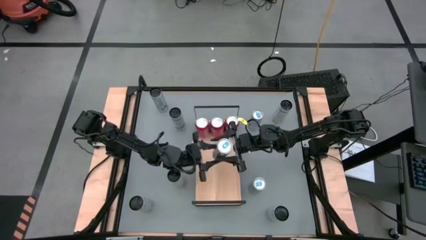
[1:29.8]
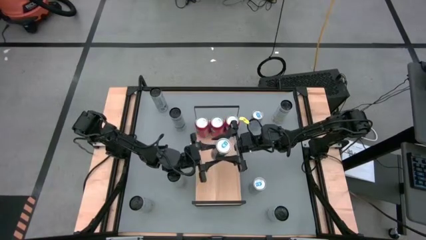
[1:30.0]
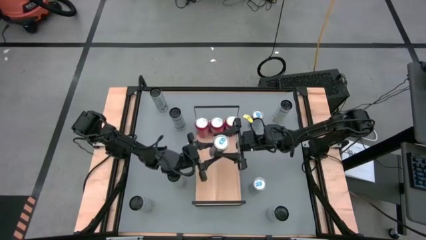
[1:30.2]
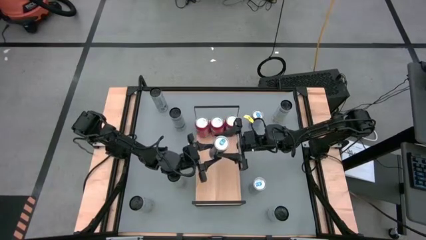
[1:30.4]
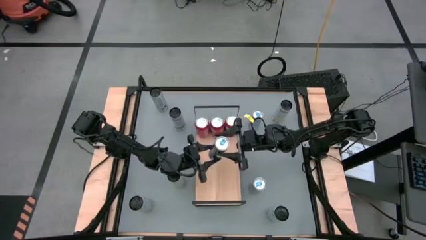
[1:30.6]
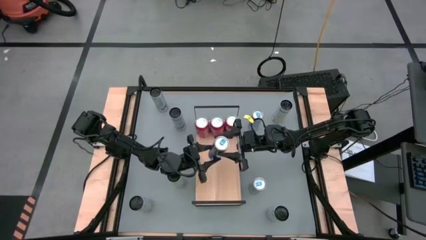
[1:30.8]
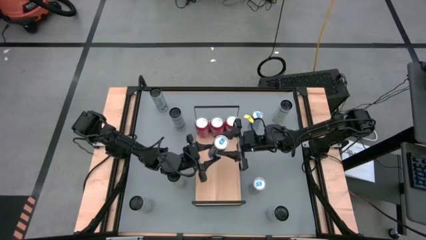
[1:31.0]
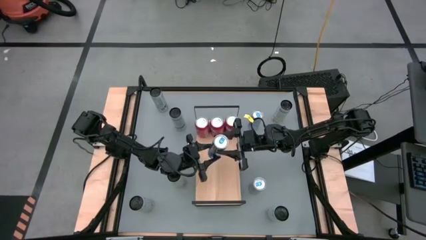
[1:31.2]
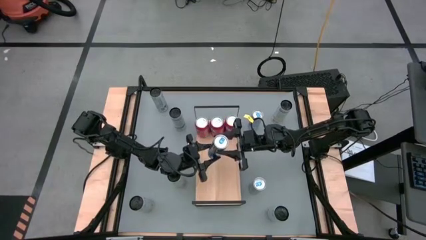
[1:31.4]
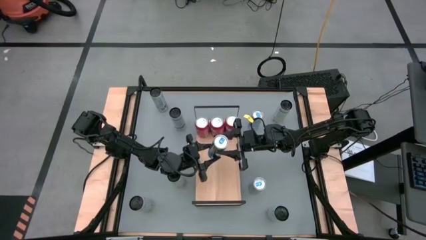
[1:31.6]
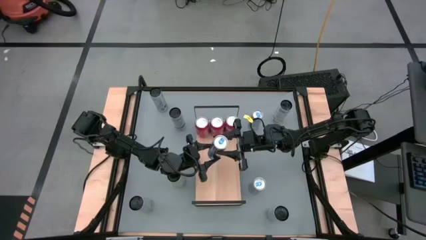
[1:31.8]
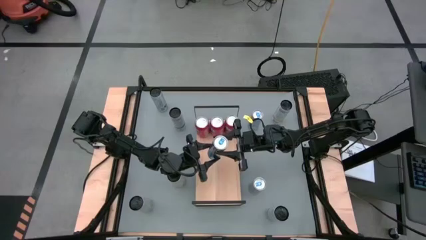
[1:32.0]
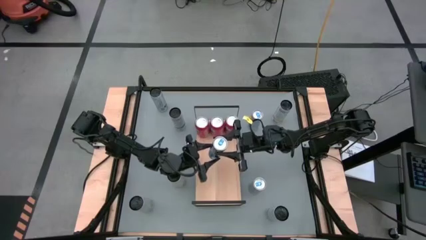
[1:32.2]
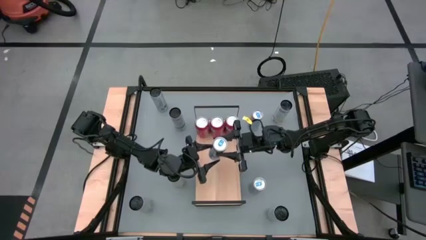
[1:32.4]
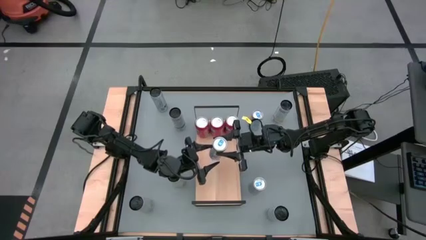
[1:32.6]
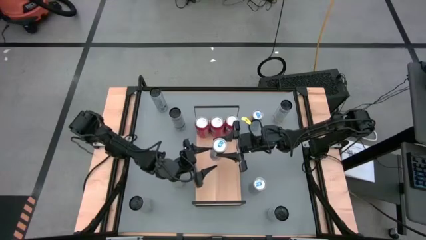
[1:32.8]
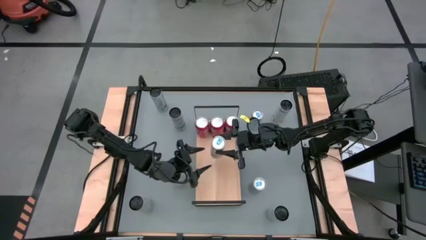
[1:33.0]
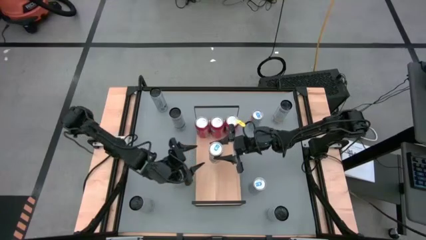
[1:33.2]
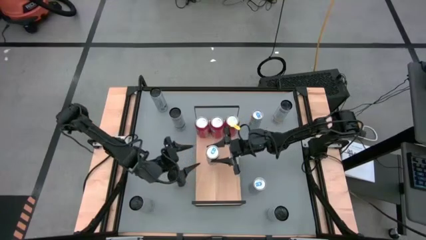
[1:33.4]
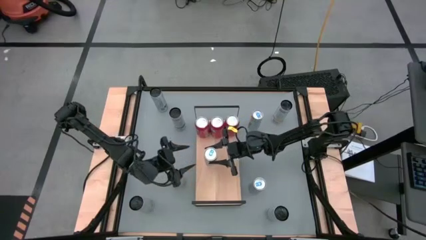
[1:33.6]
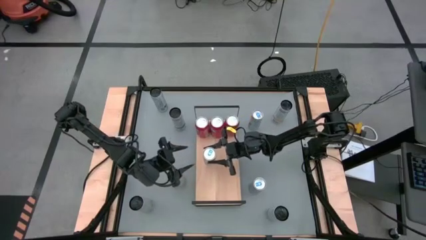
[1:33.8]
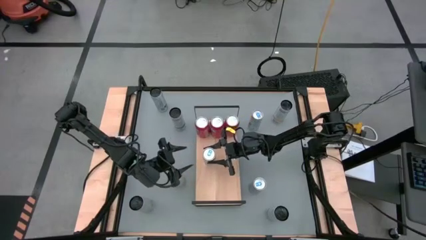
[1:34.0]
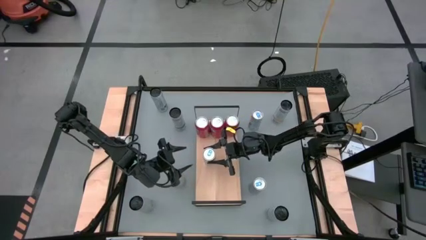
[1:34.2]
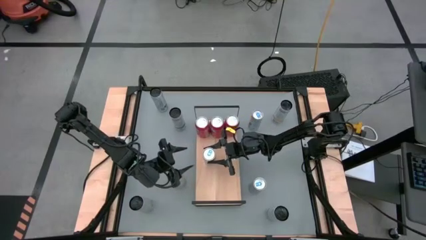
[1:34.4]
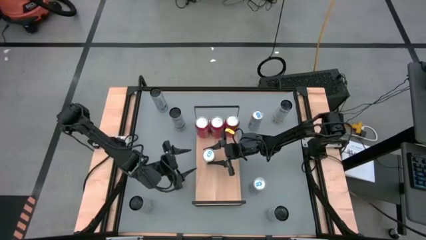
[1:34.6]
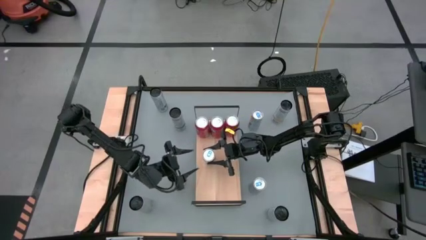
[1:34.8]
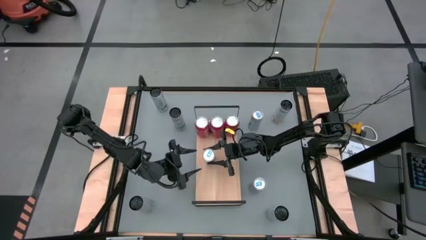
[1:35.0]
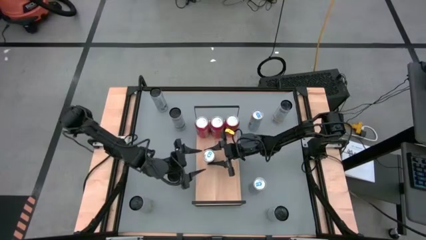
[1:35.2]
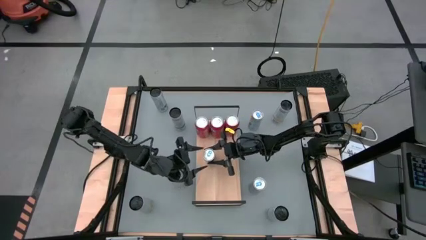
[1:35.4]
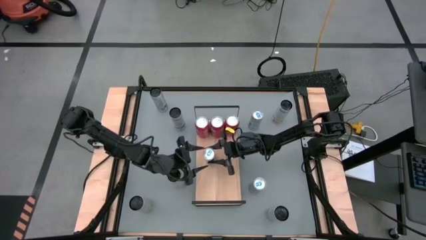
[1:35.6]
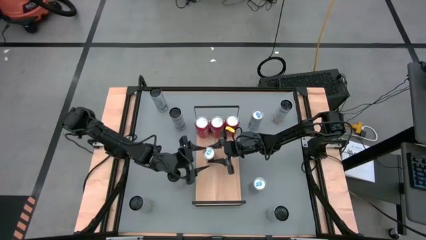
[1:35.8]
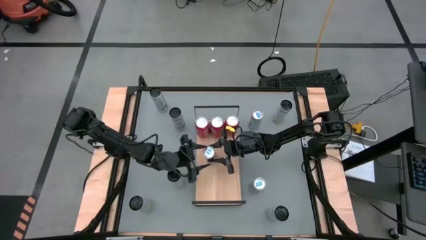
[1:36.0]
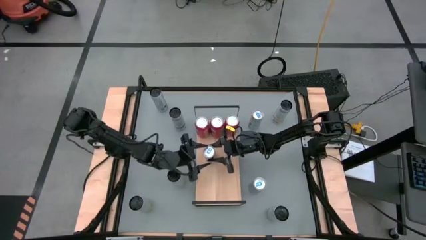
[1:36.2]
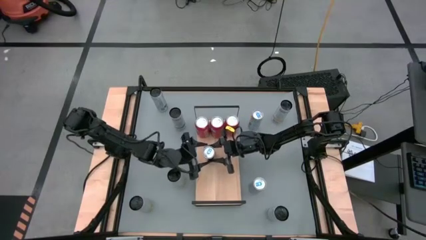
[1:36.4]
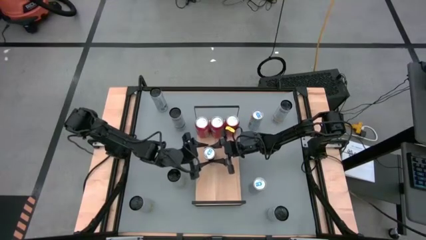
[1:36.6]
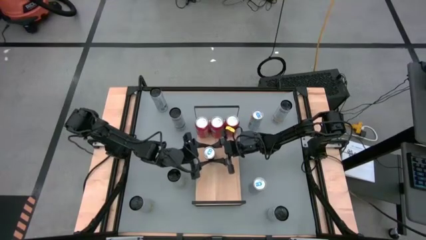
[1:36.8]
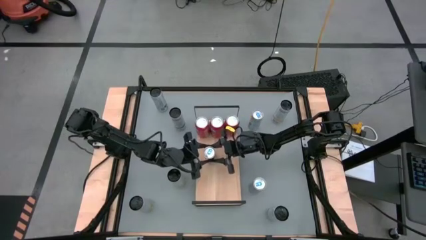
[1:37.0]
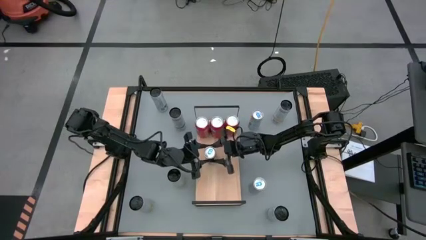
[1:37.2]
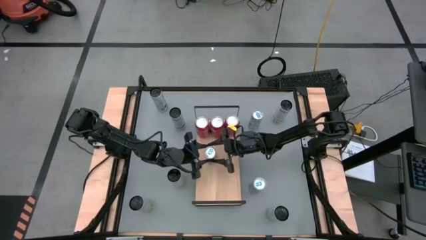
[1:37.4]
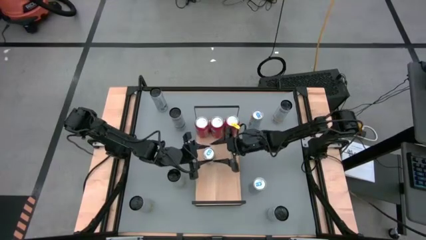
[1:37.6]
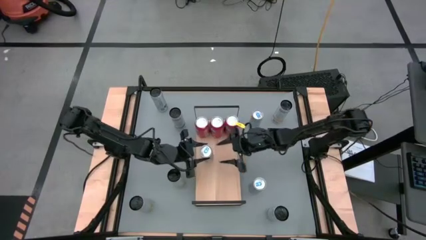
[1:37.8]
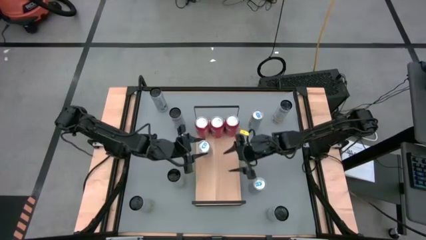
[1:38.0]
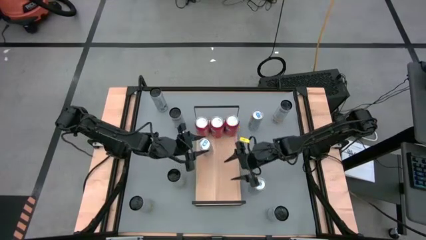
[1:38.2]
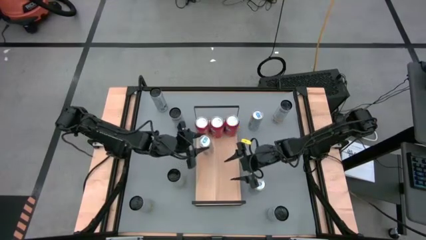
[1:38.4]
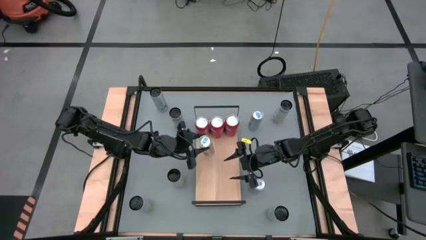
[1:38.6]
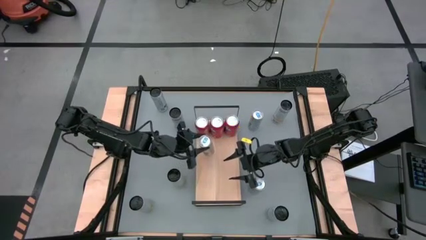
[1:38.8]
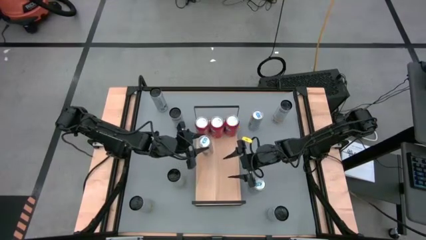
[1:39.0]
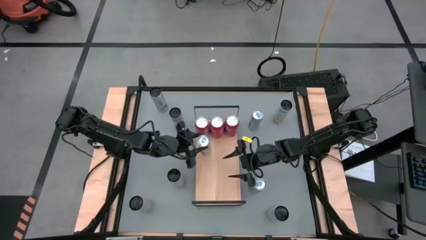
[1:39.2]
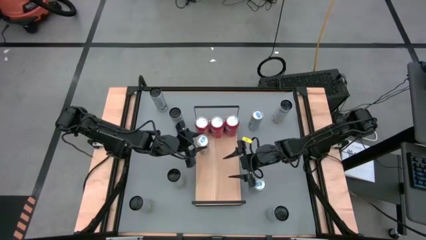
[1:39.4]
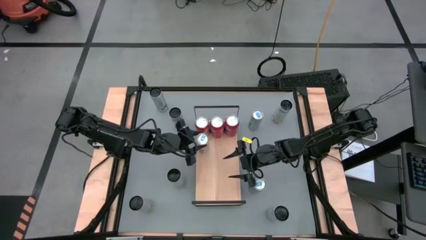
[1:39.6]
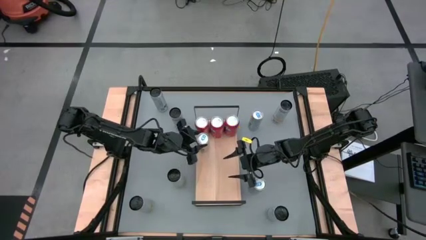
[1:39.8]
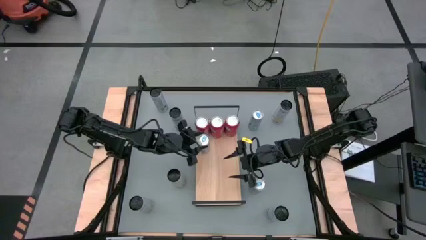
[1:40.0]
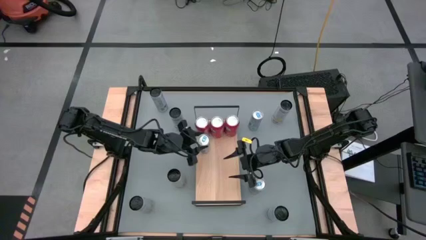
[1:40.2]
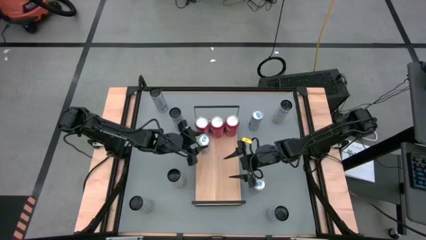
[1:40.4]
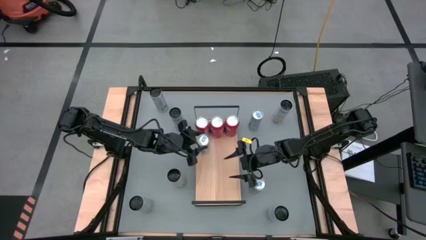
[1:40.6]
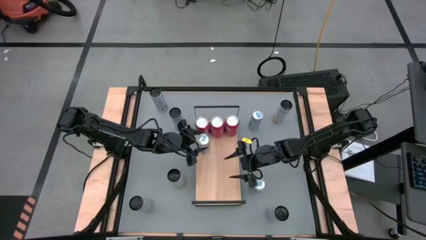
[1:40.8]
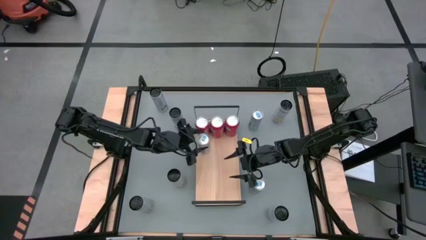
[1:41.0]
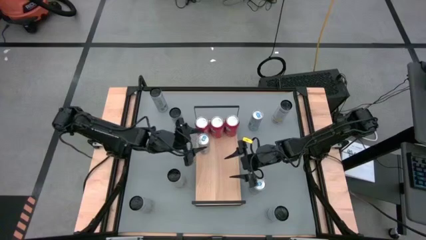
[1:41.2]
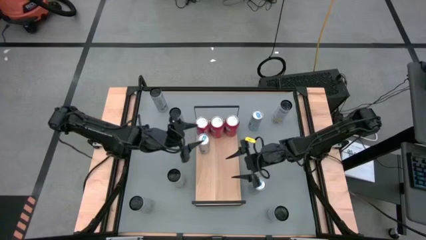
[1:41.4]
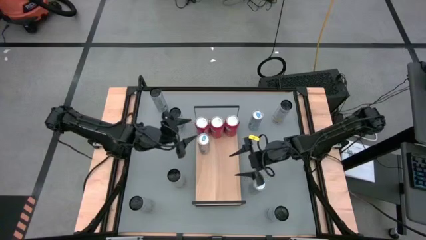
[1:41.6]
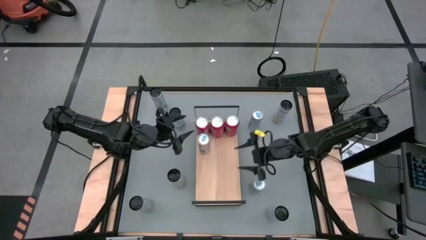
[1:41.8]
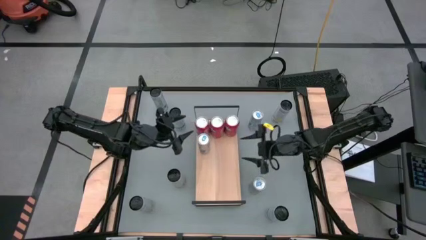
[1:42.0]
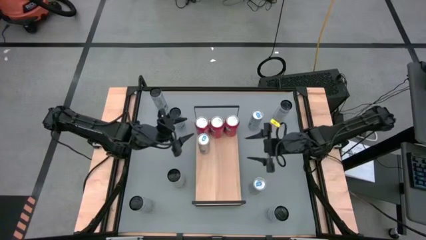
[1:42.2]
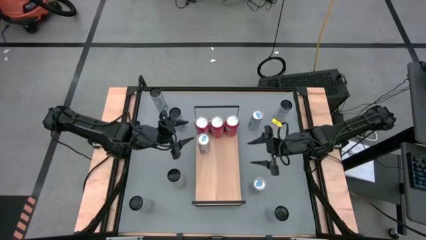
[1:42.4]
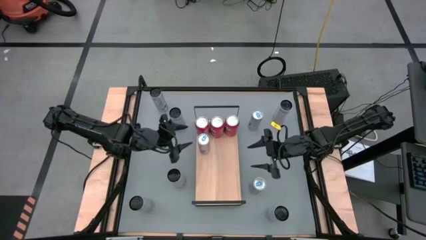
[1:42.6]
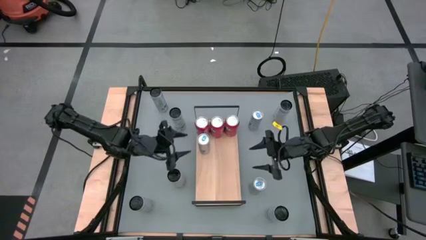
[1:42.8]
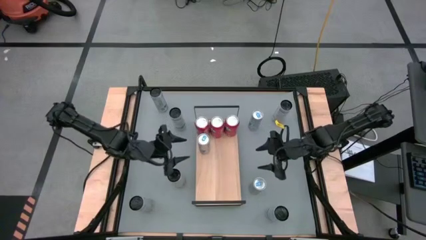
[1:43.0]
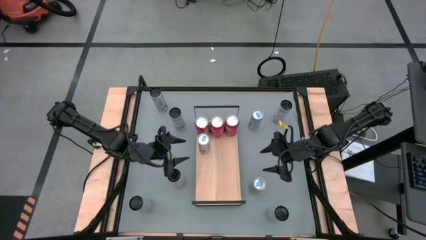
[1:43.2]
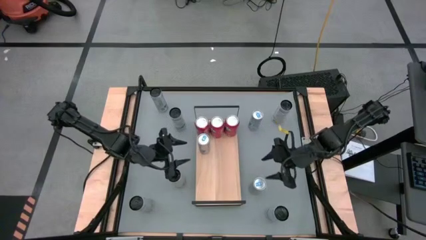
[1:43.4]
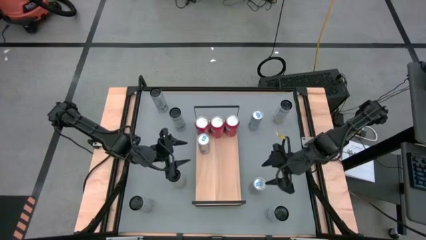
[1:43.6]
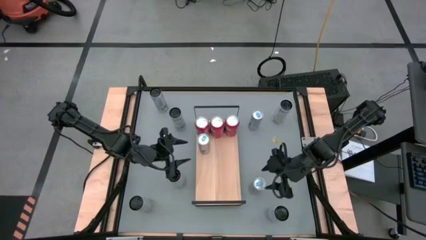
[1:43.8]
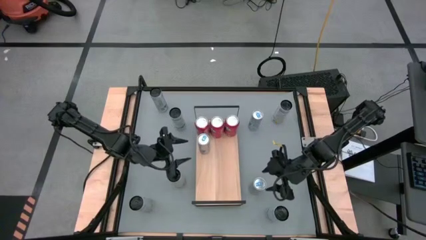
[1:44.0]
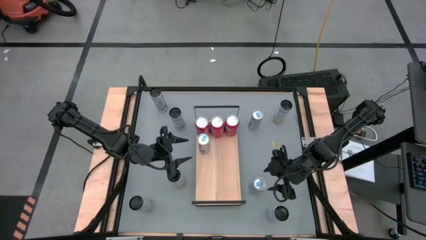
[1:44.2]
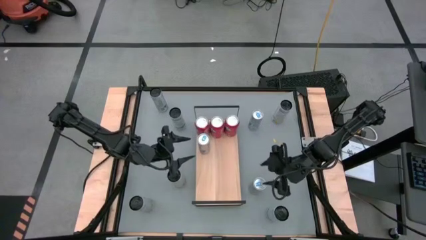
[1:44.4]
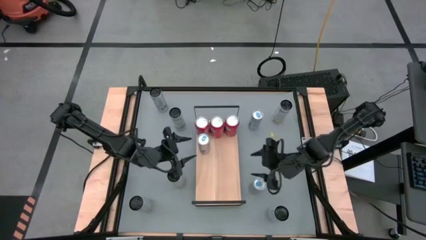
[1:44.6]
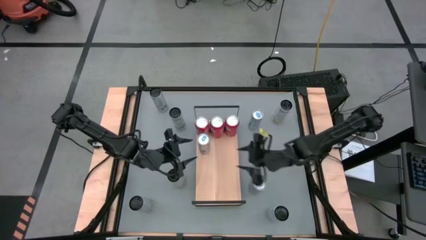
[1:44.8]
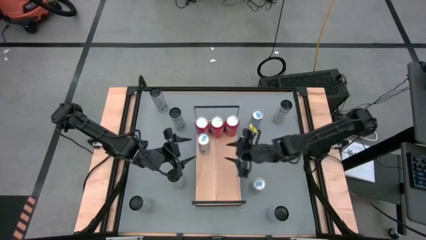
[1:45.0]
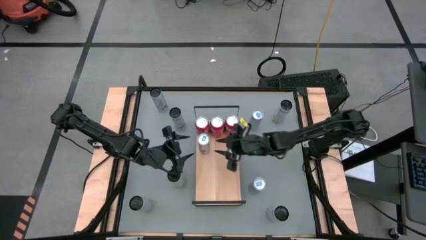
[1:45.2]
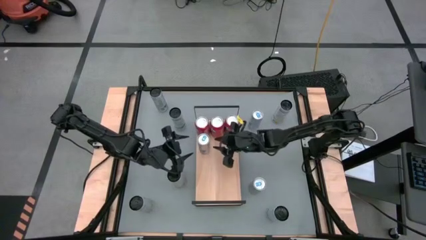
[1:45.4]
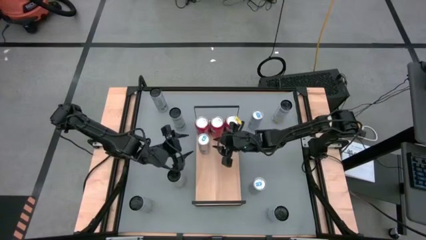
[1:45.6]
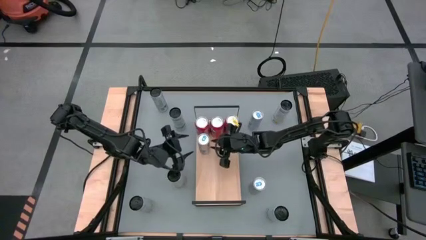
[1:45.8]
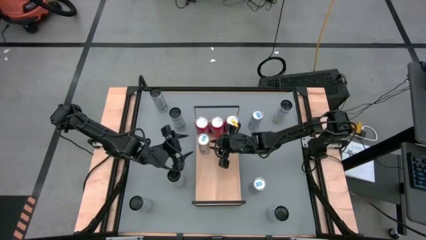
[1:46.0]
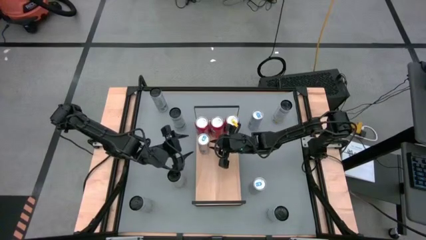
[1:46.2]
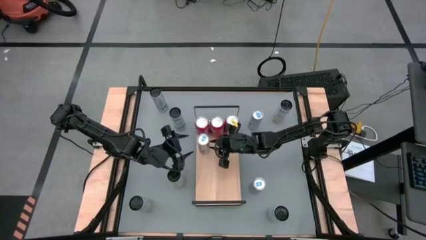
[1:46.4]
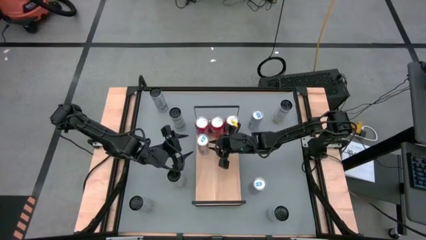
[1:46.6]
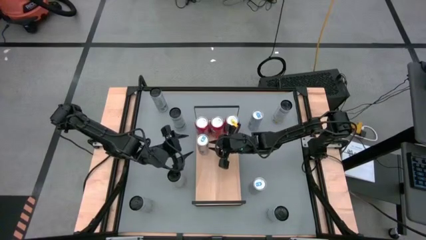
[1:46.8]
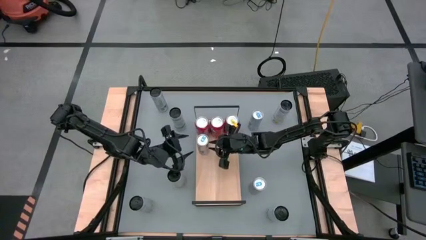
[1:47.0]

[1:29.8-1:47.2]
Task: Place canned beverage on shelf
Put the middle blue soda can on the shelf
